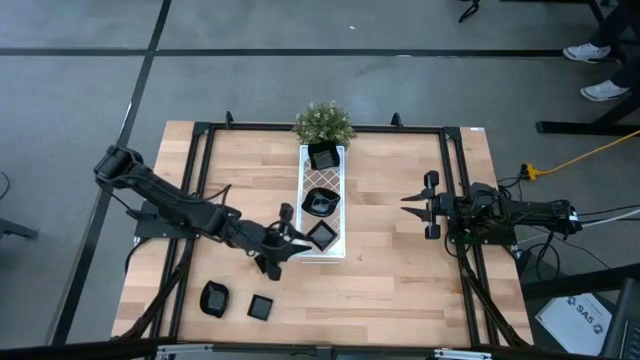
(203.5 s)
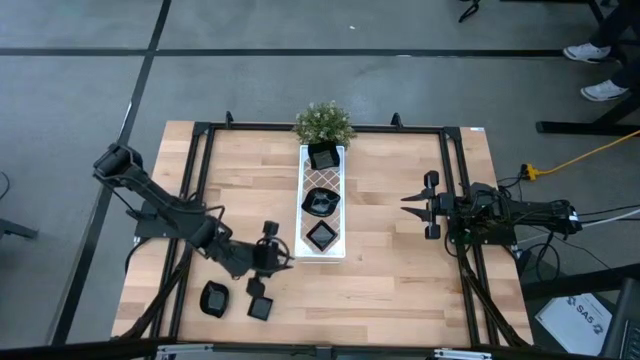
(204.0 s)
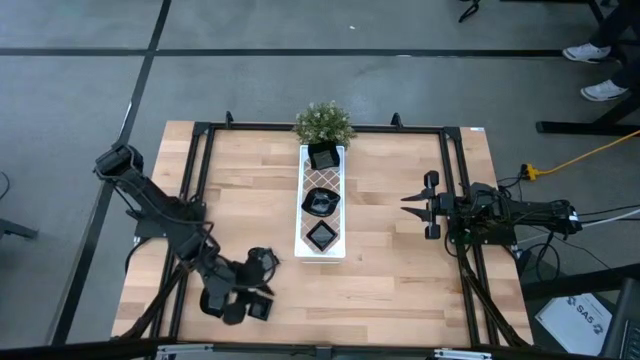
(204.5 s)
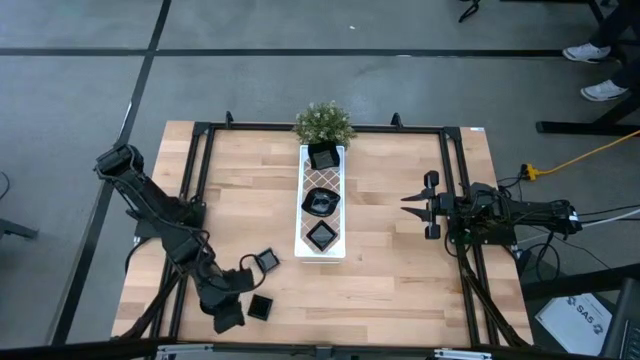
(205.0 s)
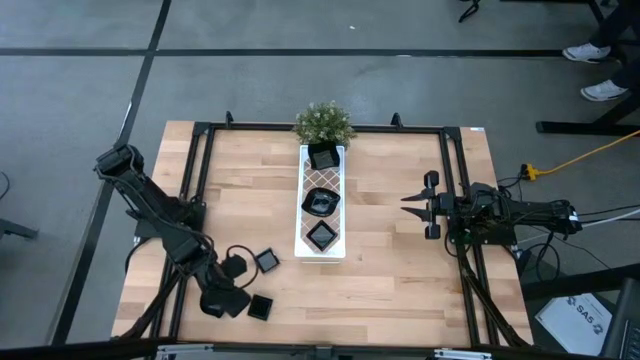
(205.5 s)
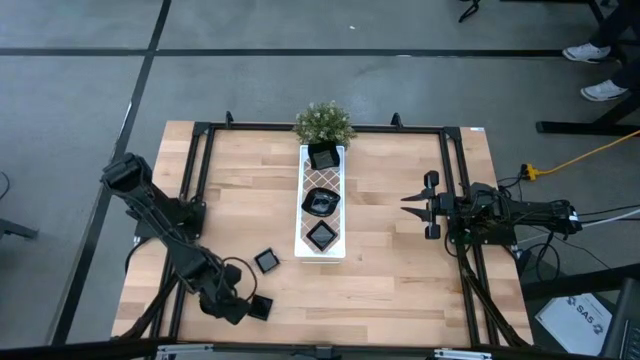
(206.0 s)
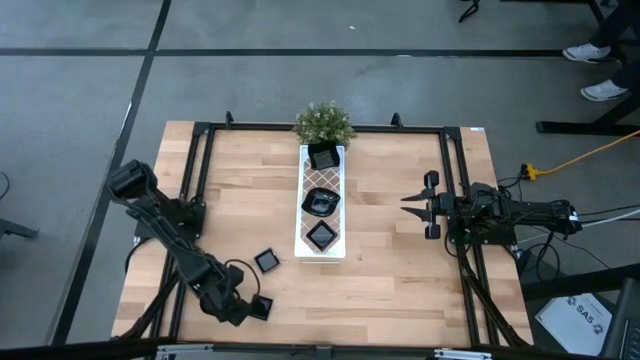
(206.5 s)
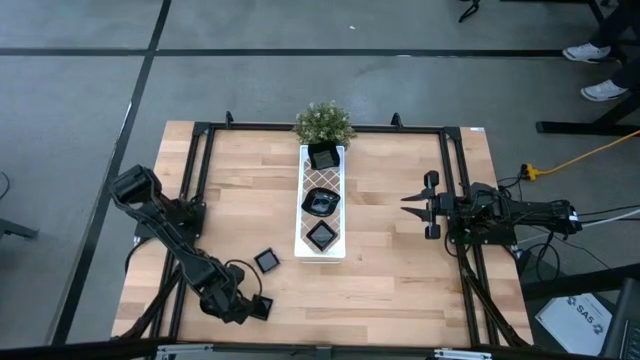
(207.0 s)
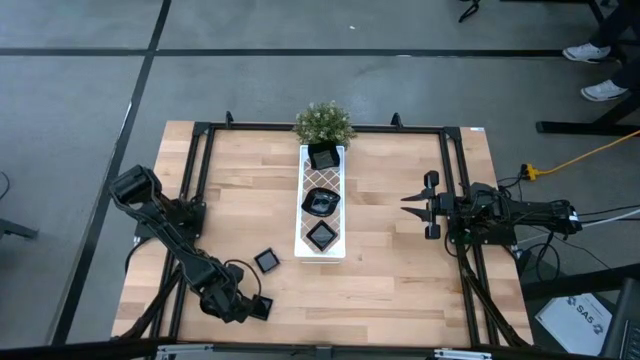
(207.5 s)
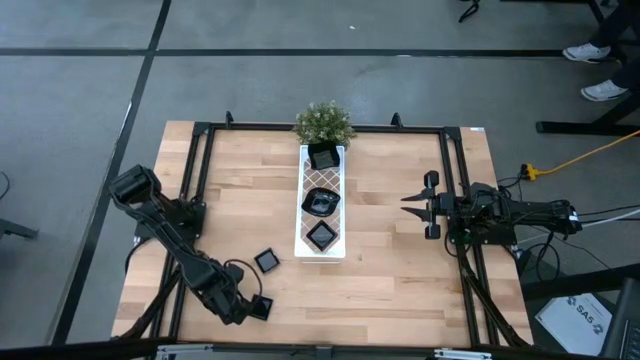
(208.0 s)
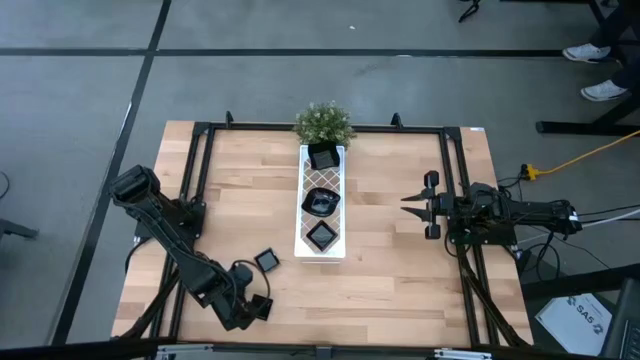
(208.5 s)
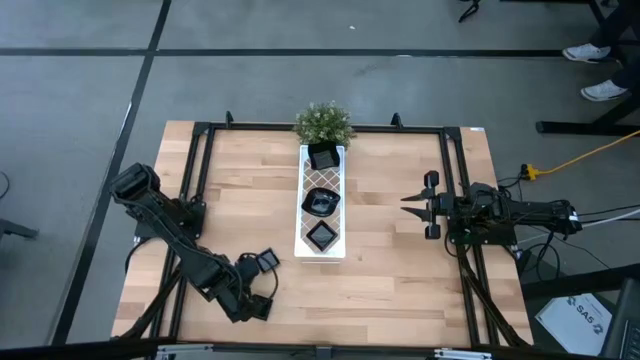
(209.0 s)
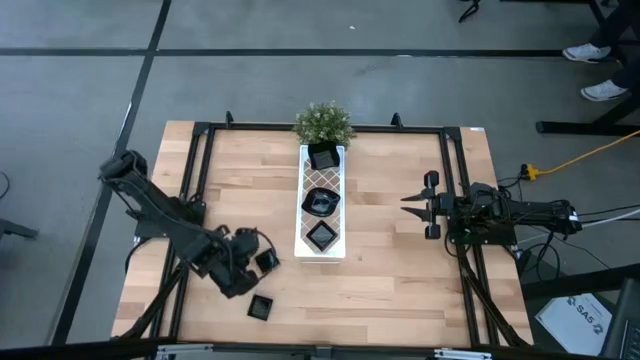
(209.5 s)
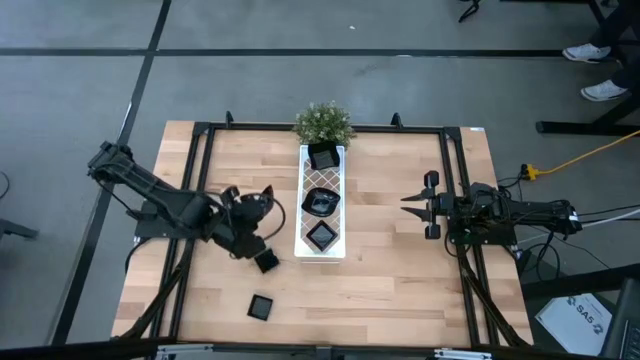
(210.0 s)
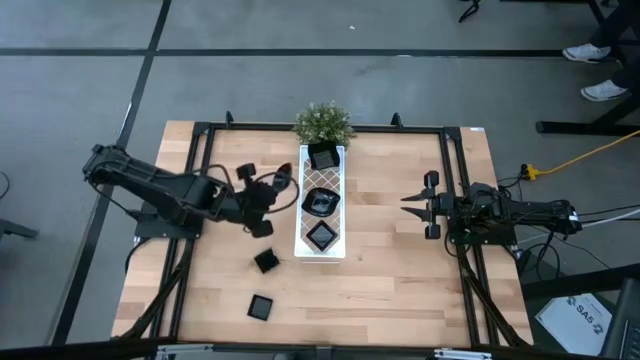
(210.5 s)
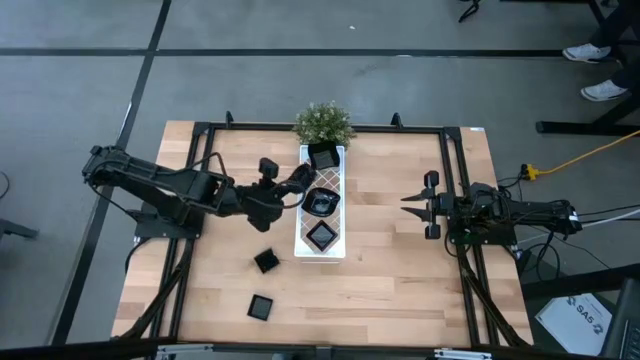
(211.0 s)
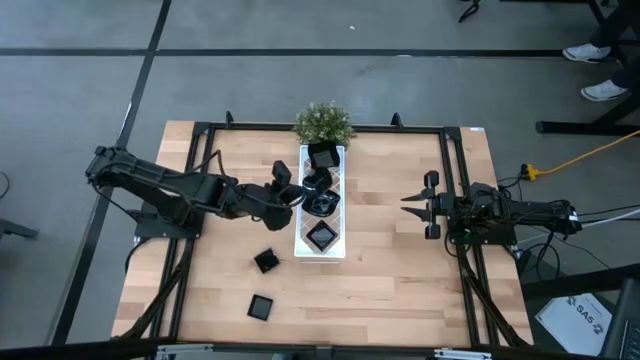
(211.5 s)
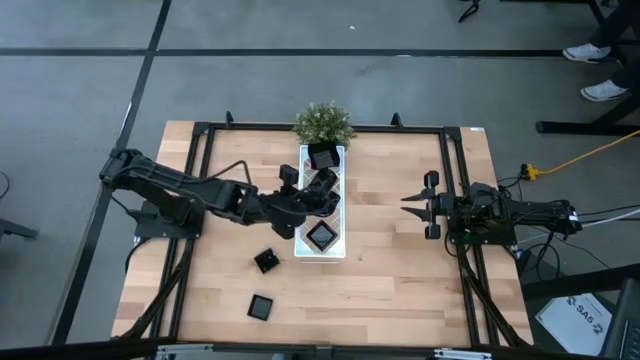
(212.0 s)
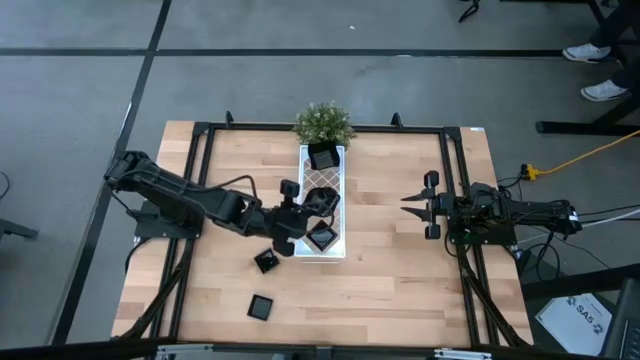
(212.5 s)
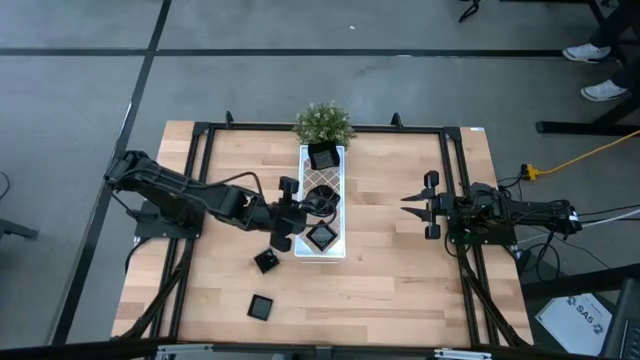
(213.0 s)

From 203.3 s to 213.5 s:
Task: Pick & Place Mini shaped plates
Stack the leaf shape plate on top of the leaf shape plate on the shelf

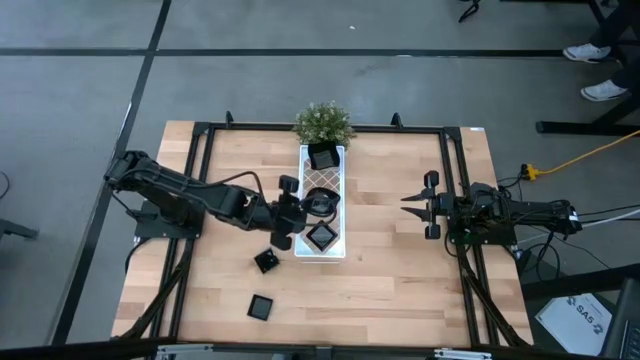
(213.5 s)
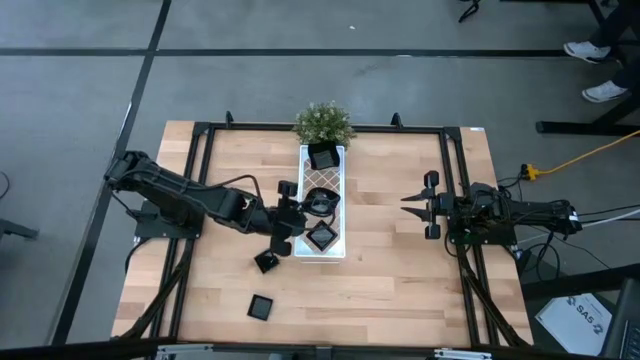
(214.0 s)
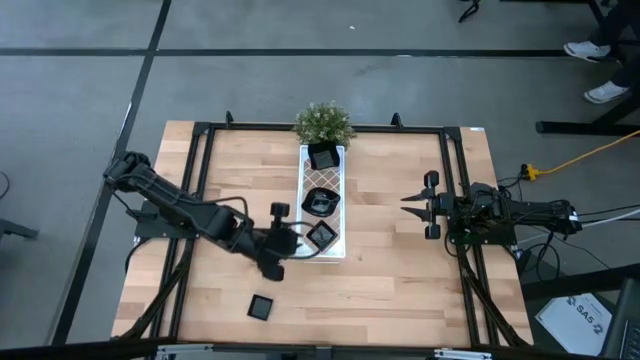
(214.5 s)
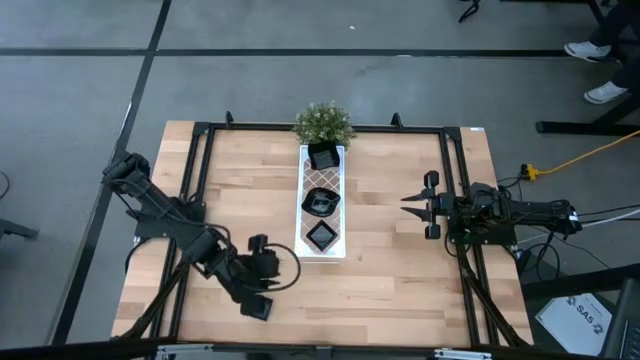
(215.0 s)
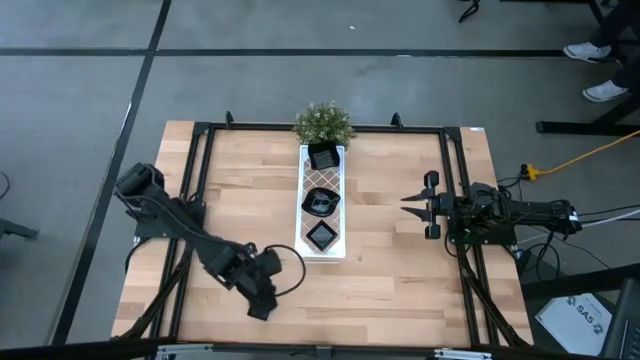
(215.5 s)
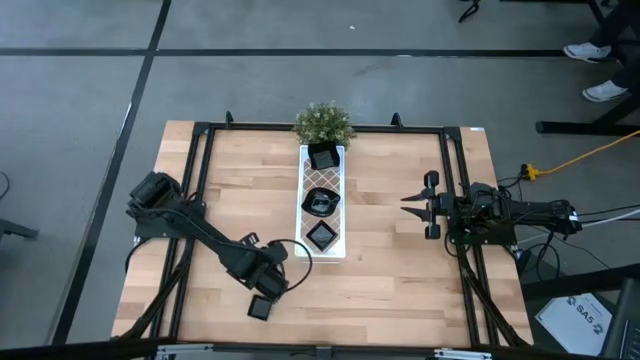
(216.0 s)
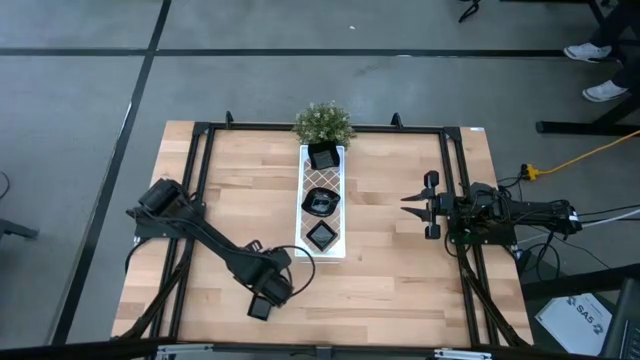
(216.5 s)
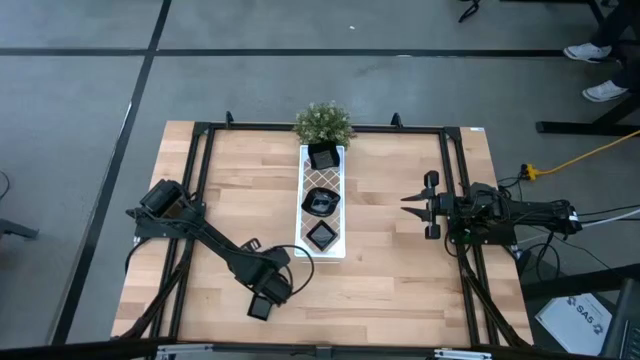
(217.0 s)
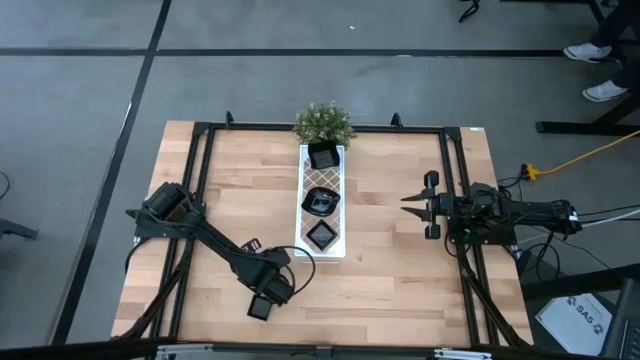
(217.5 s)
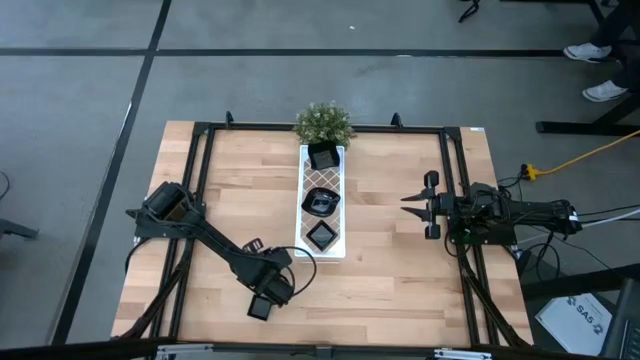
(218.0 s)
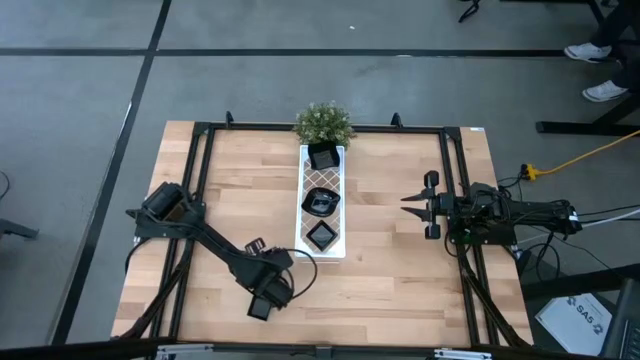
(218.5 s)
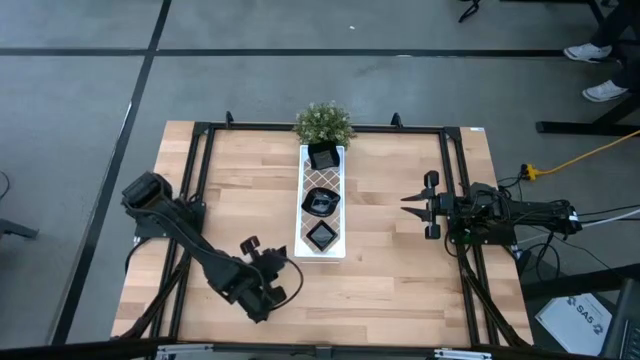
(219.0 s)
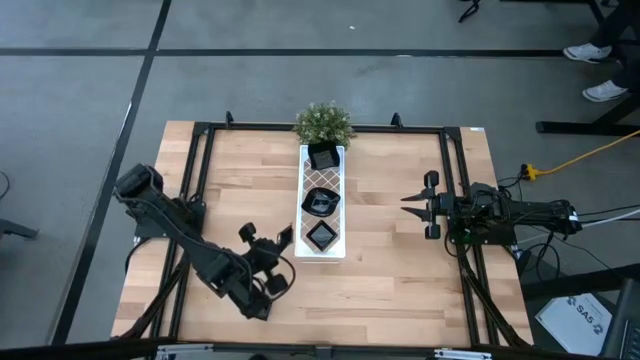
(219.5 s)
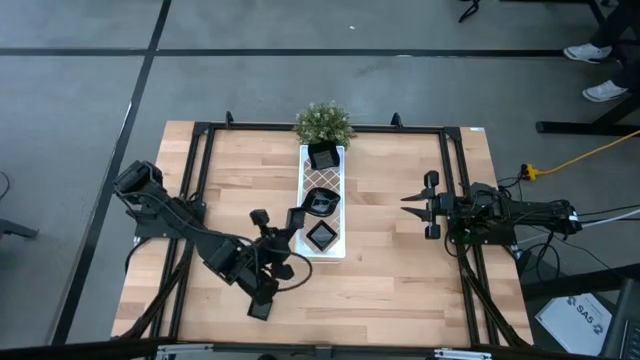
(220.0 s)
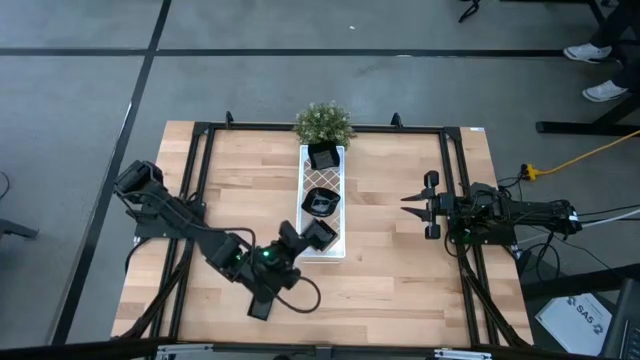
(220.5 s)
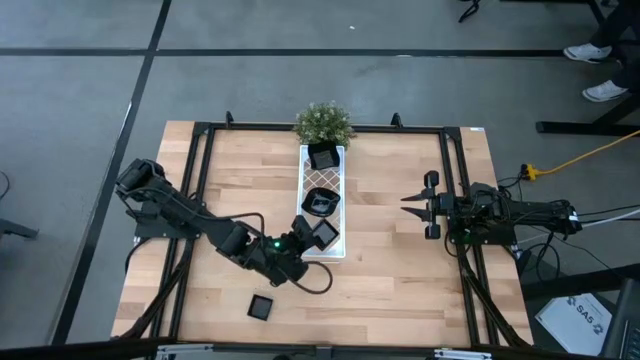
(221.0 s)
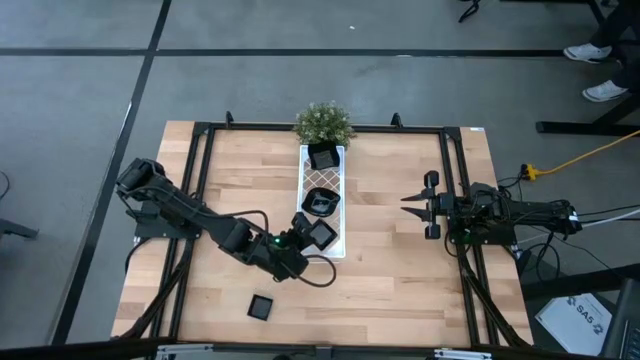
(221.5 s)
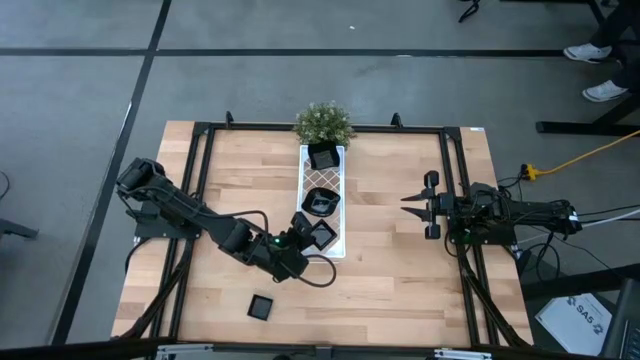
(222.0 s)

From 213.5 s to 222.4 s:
Stack the square plate on top of the square plate on the shelf

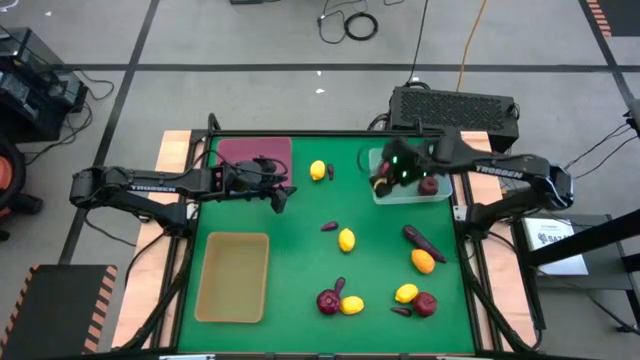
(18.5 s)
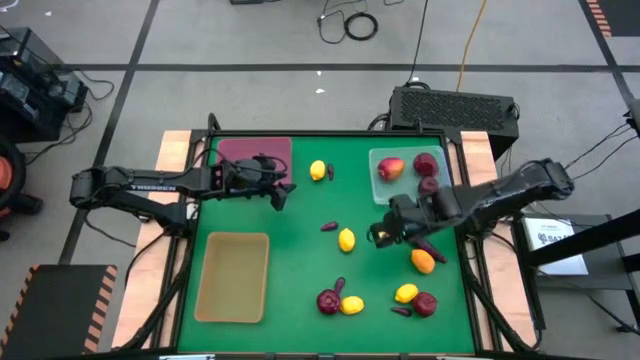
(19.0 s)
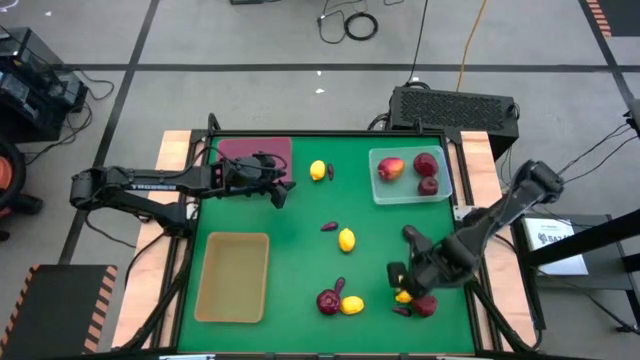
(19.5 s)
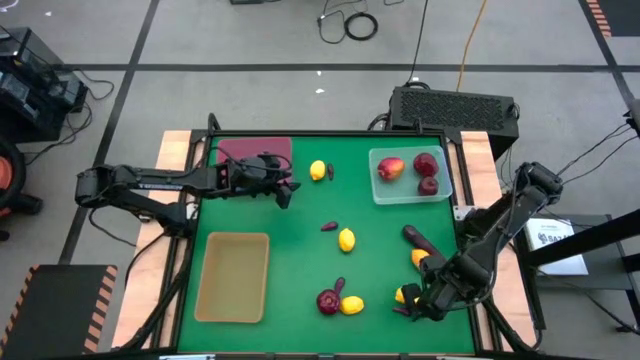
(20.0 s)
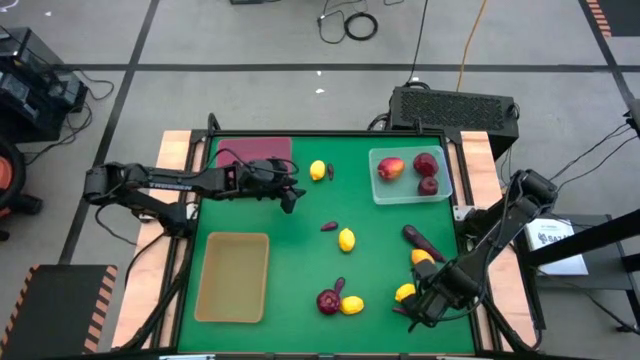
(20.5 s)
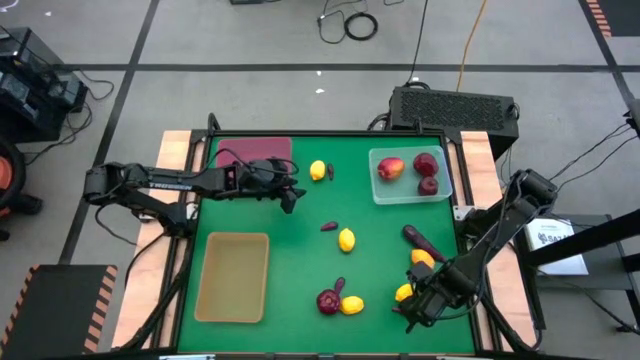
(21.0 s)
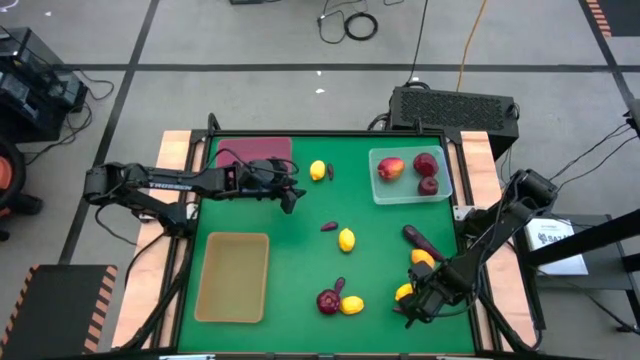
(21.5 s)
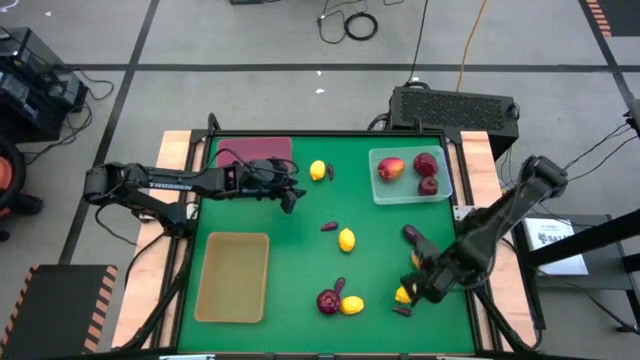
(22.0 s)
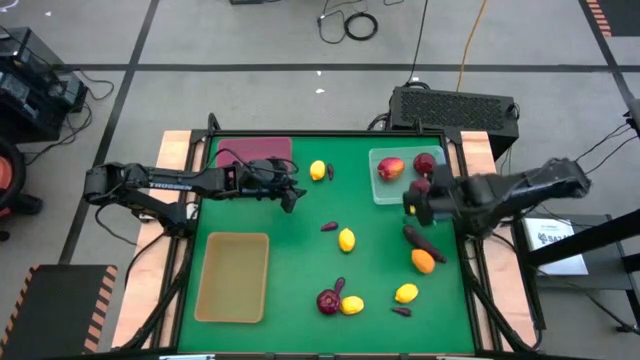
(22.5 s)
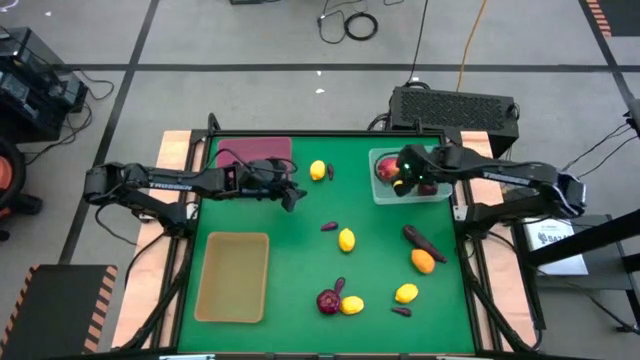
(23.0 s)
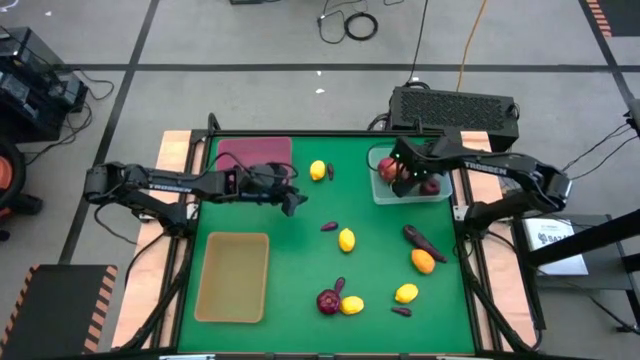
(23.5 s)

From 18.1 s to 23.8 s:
Task: Sort produce into baskets
Put the apple into the transparent bin
